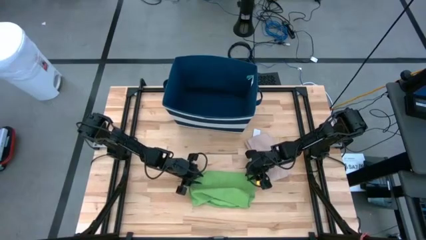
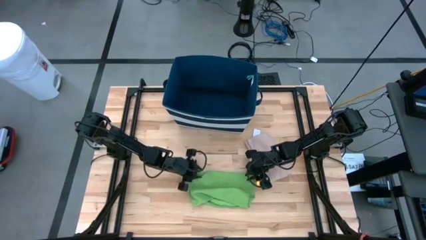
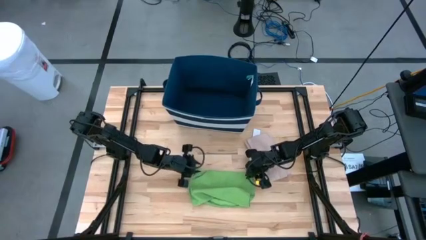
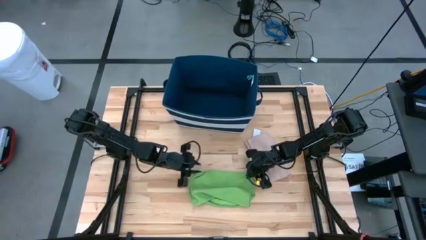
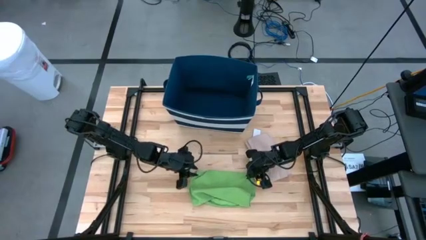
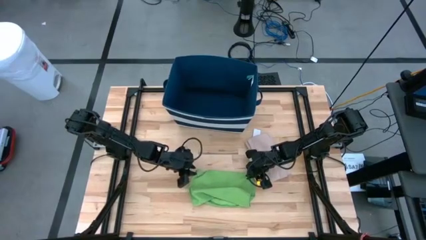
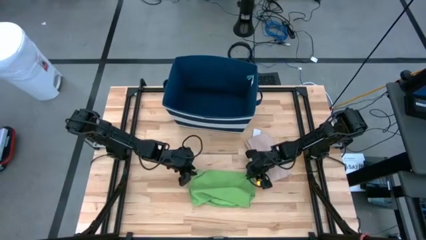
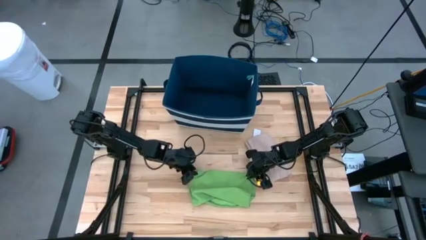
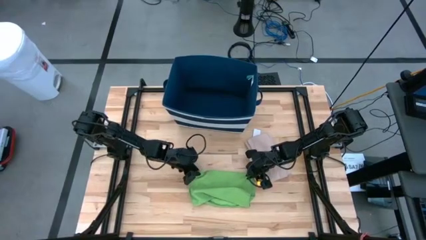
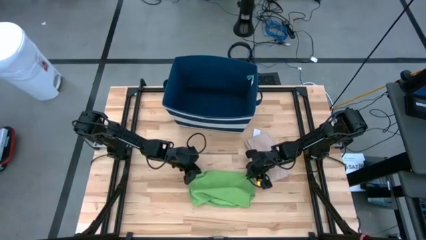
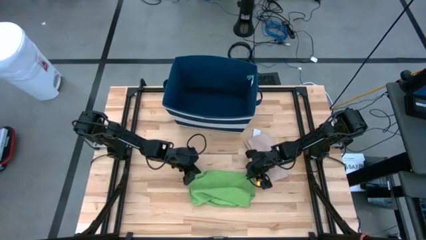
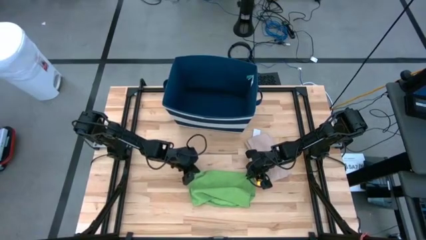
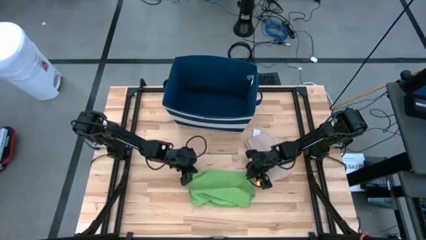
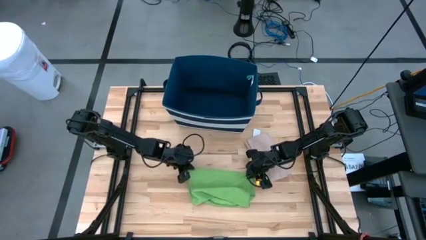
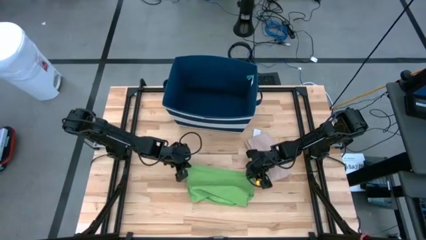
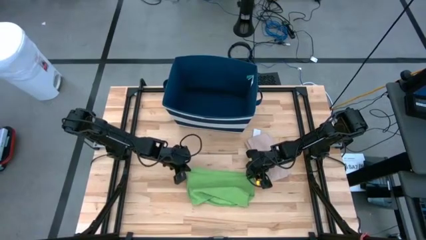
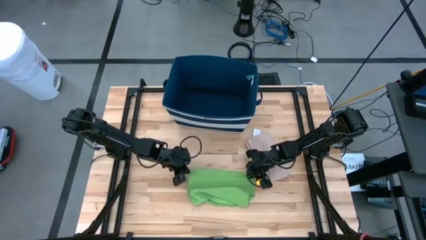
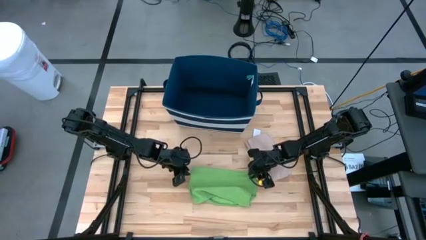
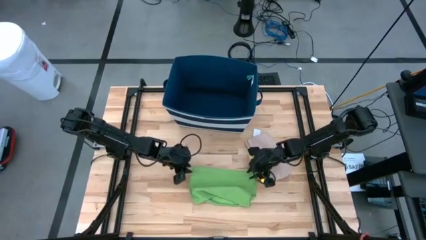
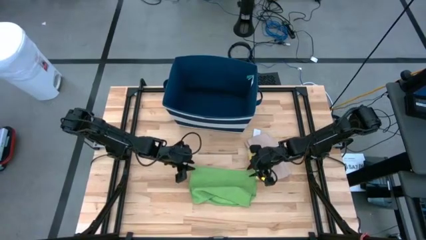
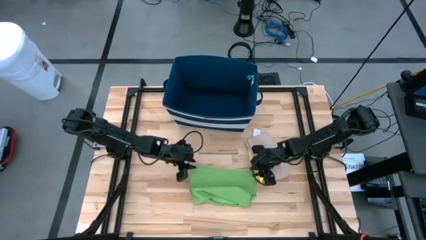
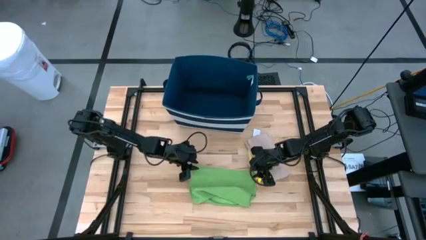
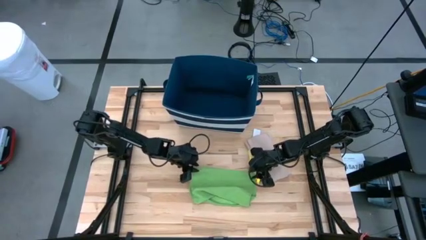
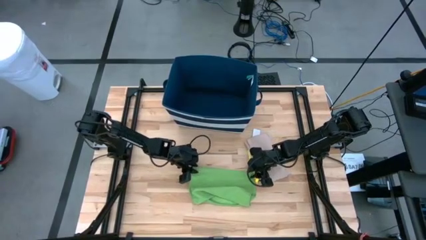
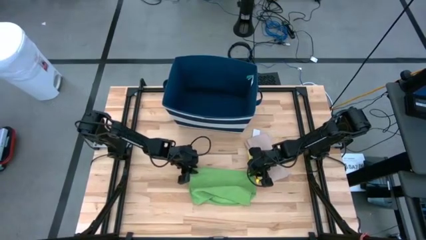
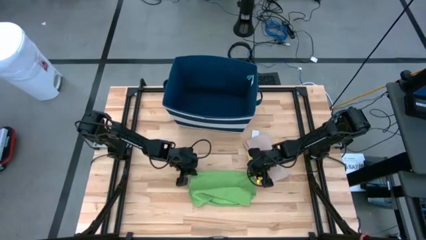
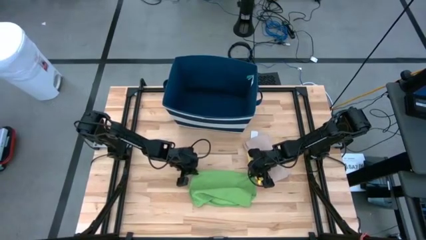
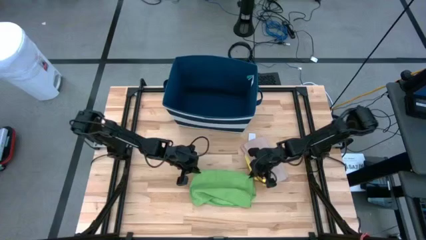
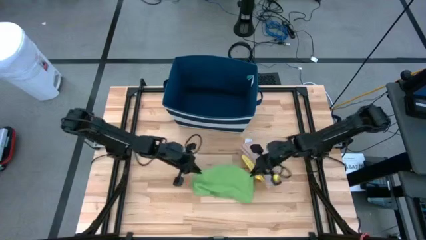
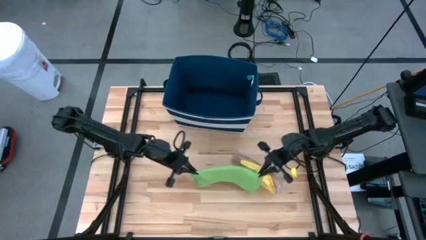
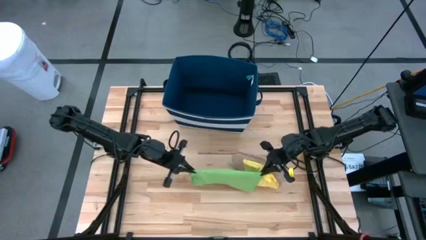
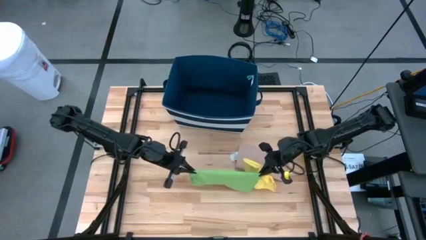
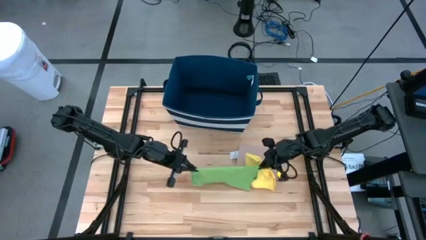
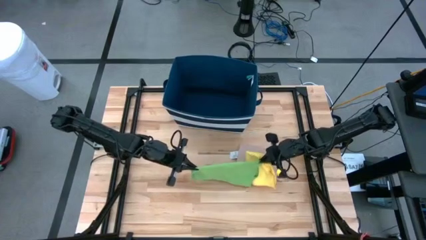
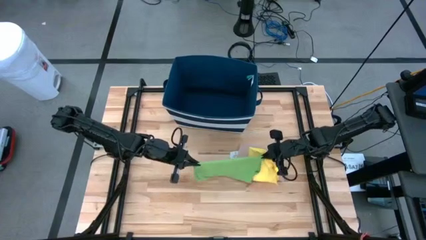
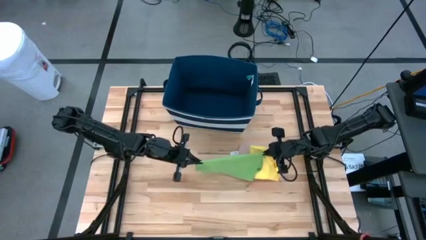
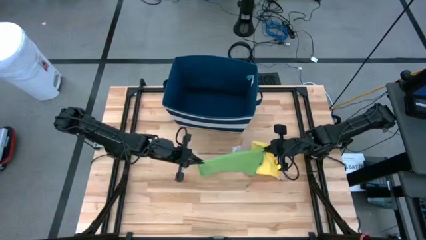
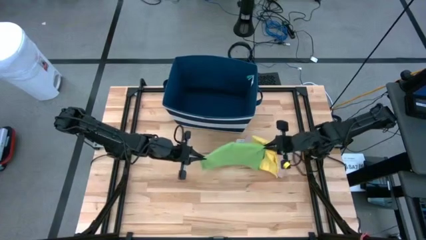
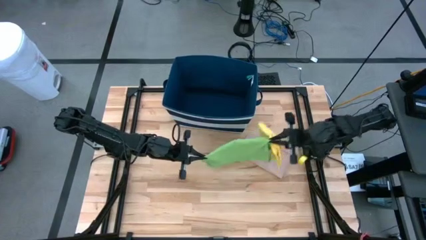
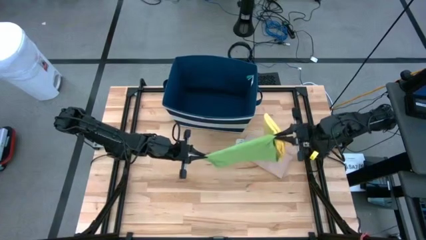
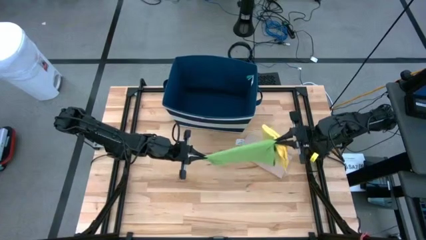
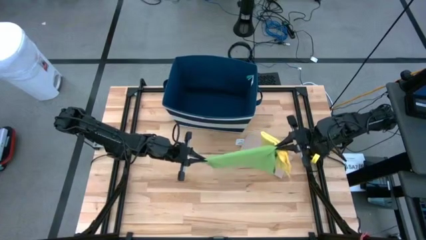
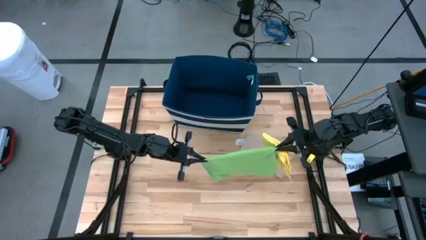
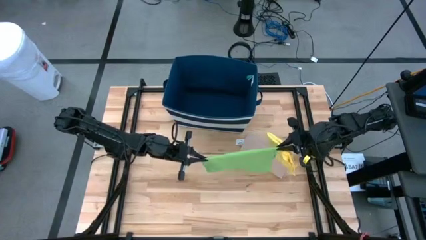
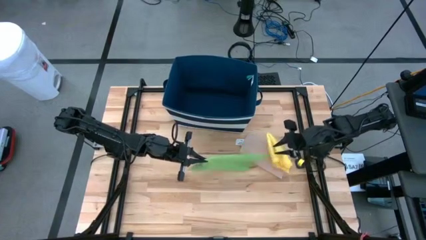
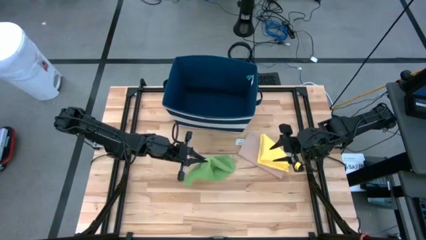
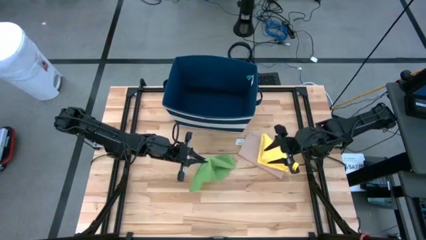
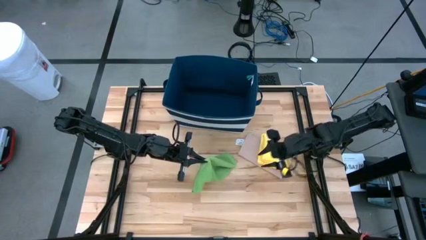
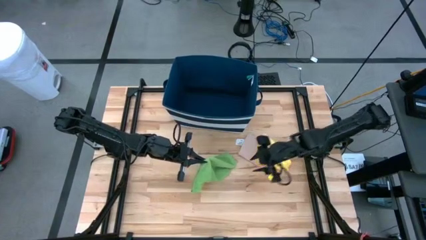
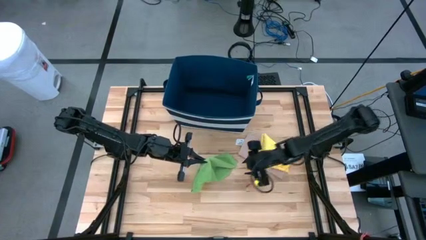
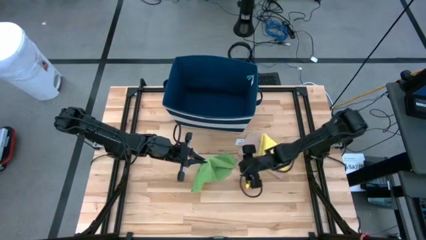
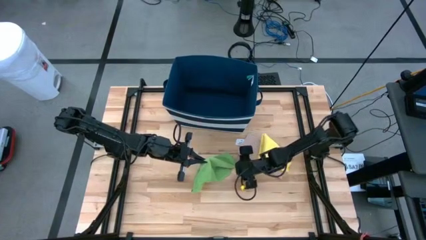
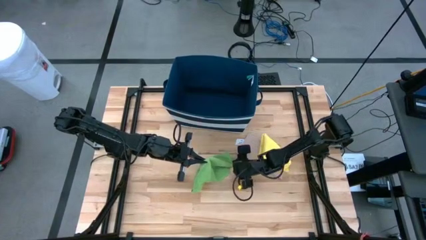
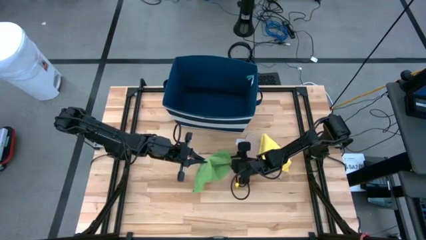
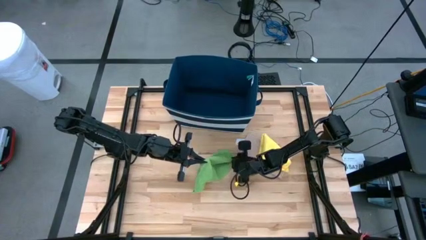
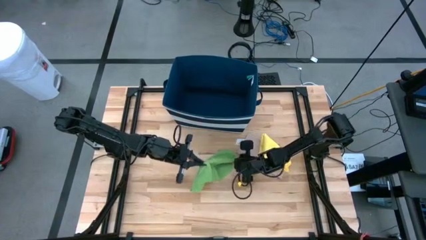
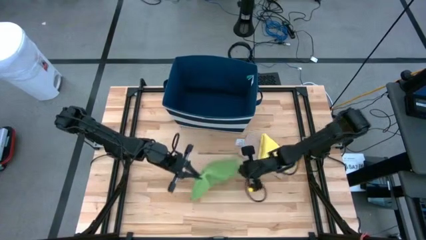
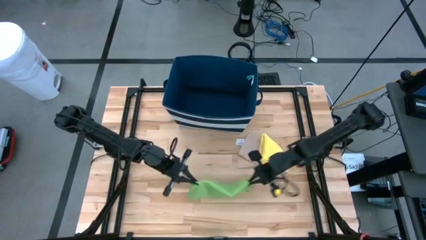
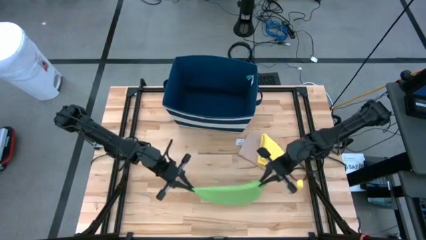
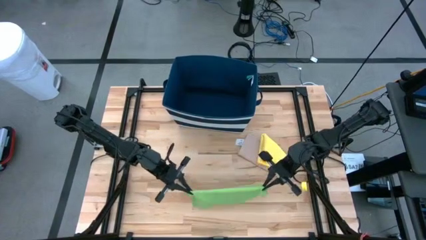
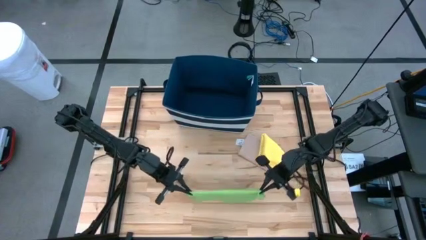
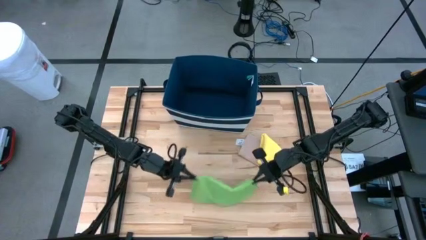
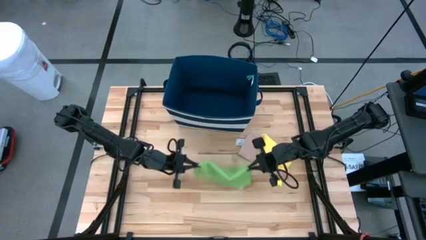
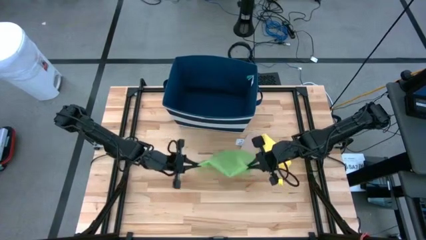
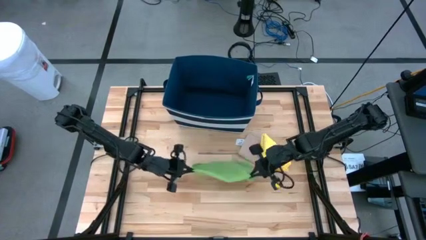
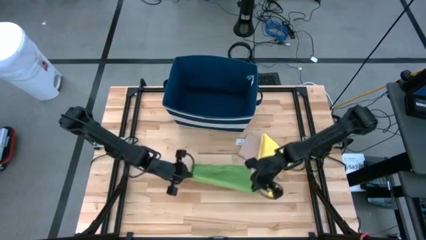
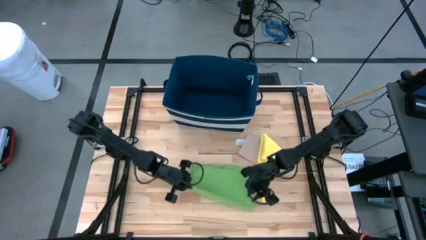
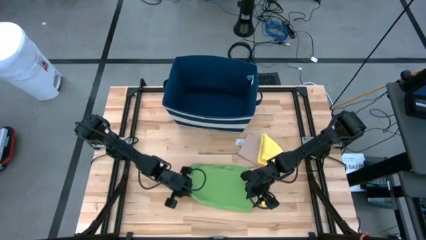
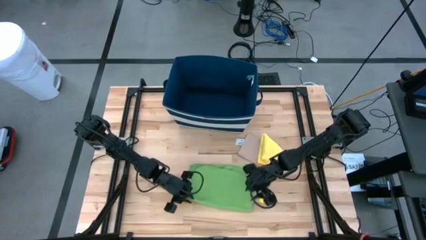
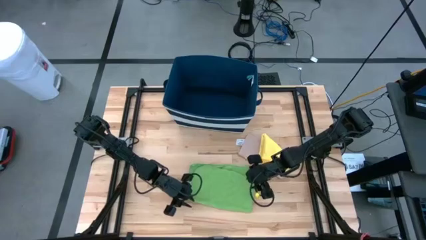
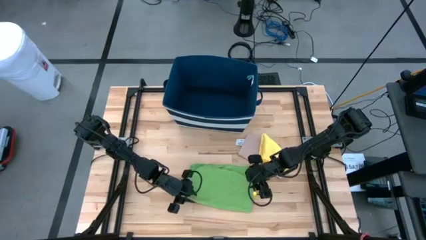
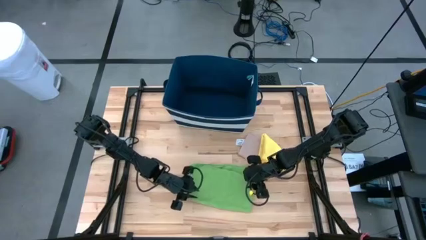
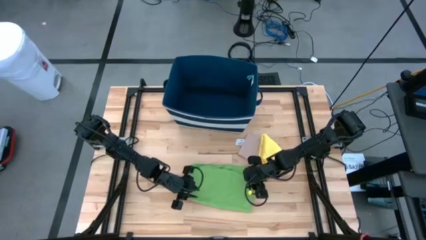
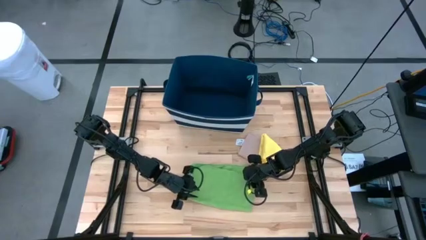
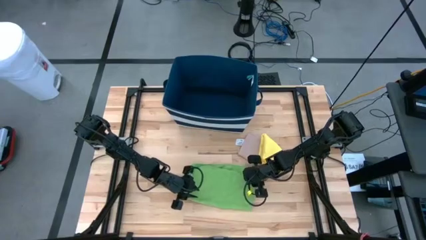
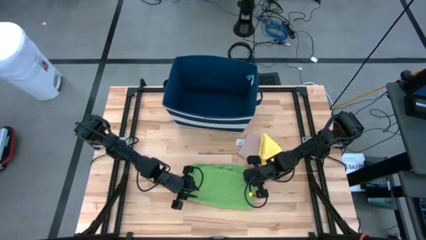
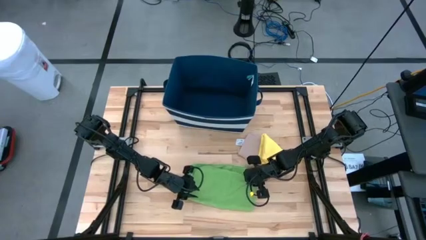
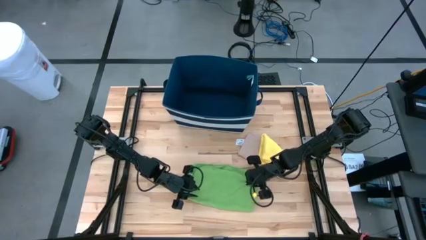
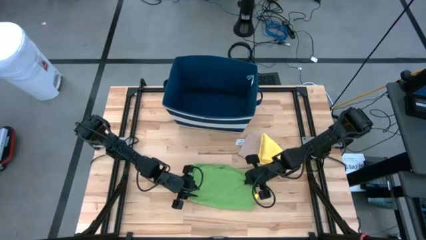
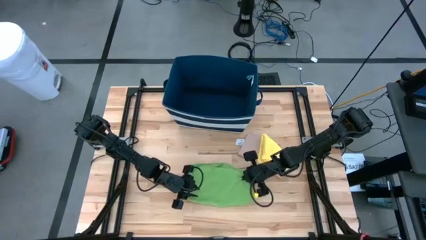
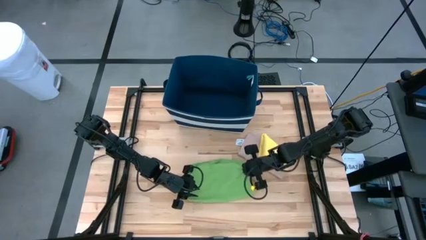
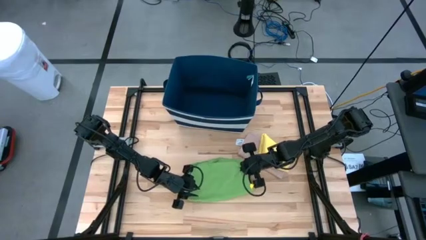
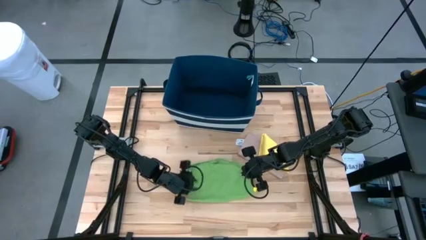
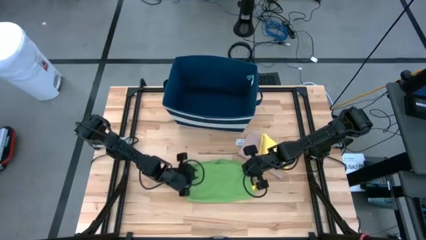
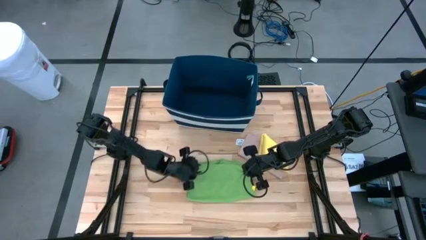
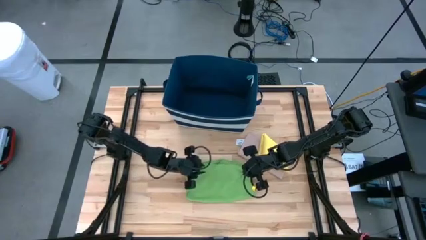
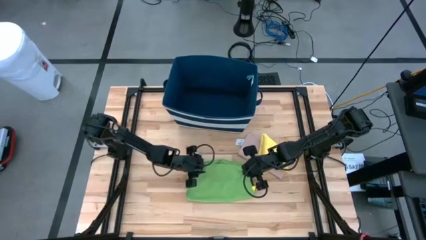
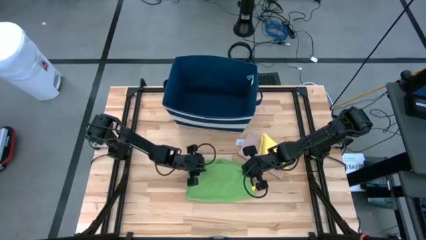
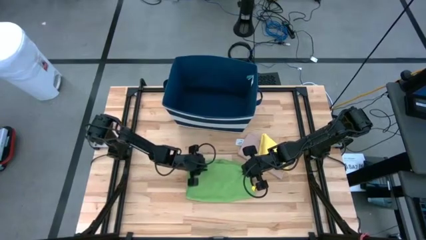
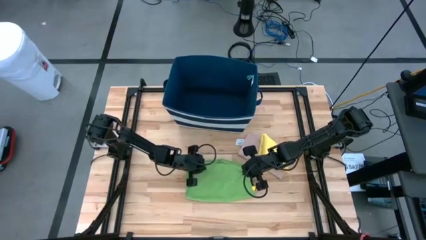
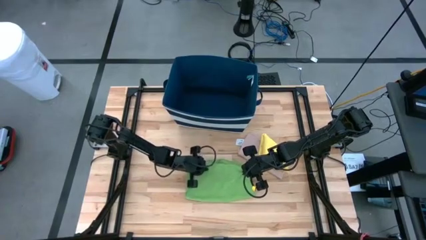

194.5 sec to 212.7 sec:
Task: Fold towel
Fold the green towel
